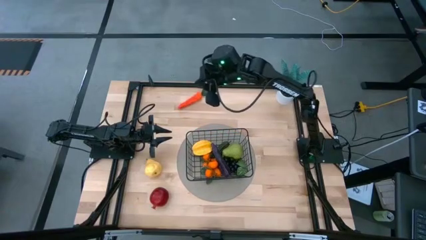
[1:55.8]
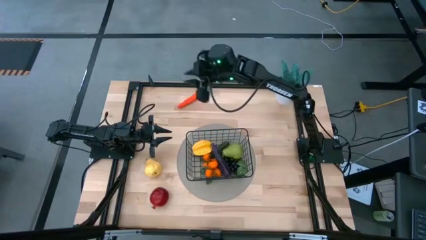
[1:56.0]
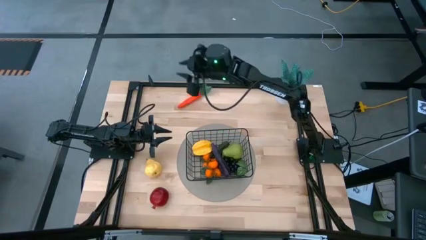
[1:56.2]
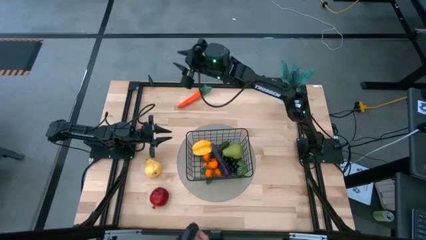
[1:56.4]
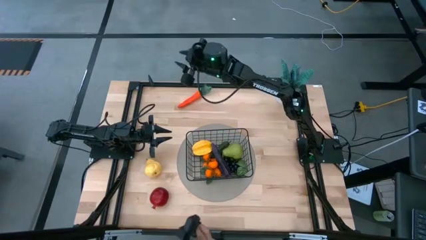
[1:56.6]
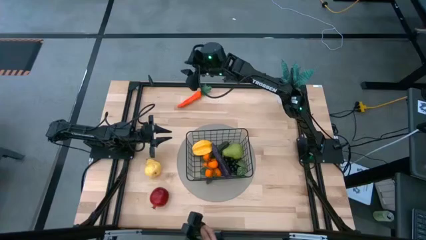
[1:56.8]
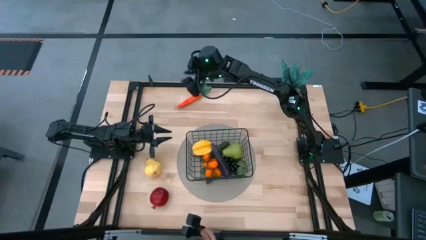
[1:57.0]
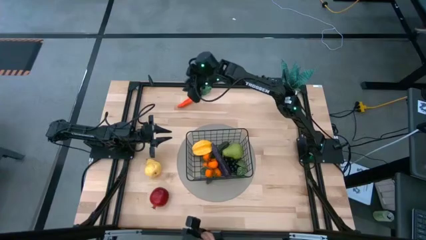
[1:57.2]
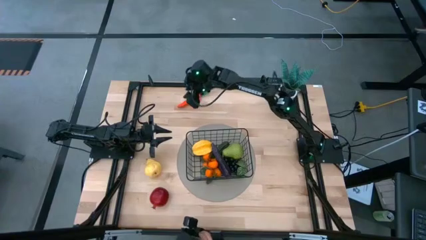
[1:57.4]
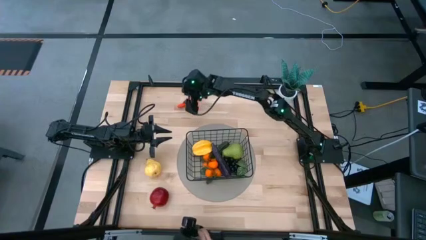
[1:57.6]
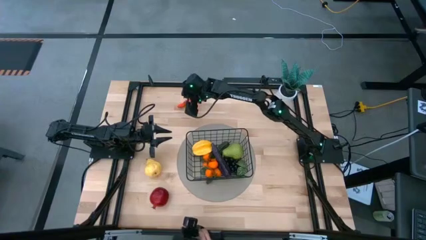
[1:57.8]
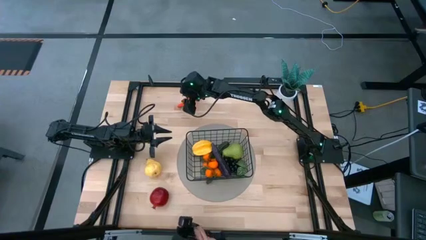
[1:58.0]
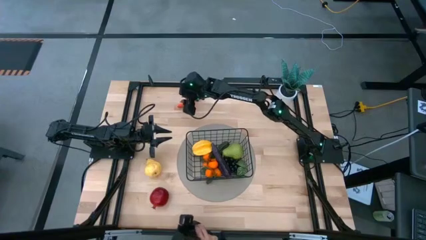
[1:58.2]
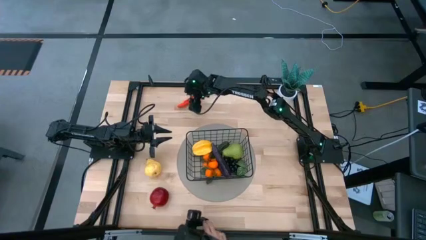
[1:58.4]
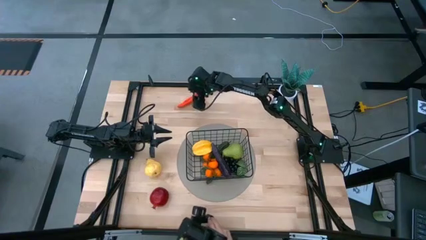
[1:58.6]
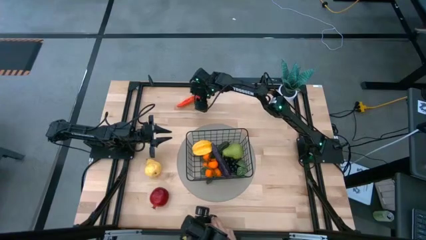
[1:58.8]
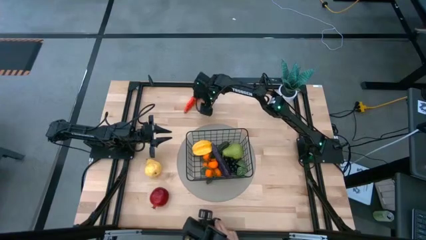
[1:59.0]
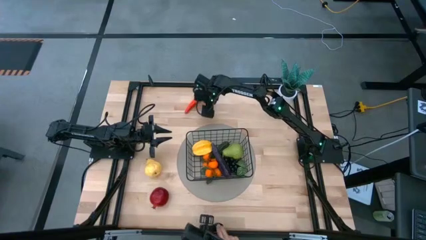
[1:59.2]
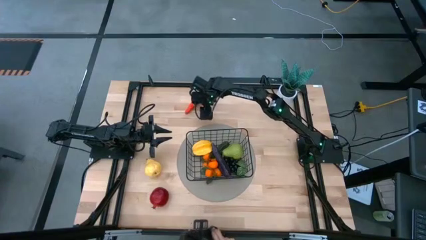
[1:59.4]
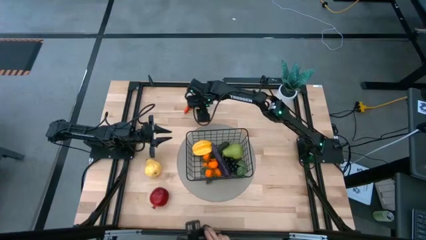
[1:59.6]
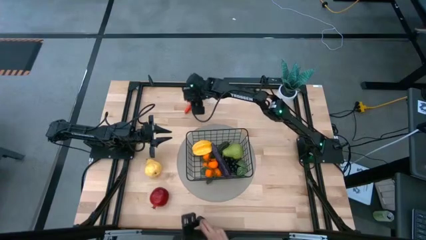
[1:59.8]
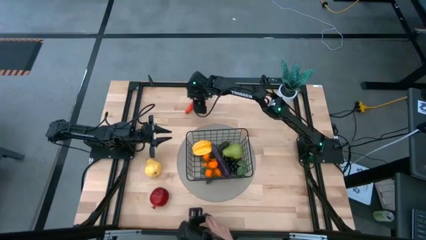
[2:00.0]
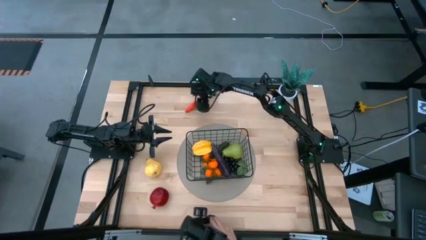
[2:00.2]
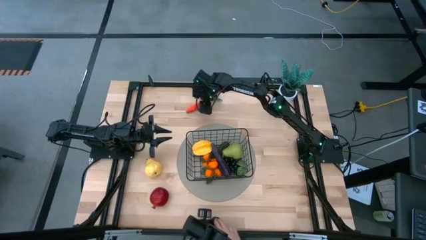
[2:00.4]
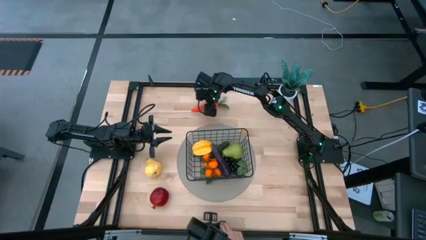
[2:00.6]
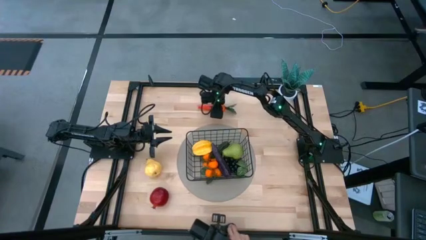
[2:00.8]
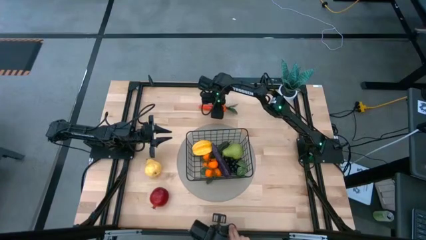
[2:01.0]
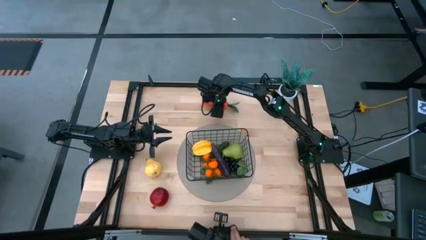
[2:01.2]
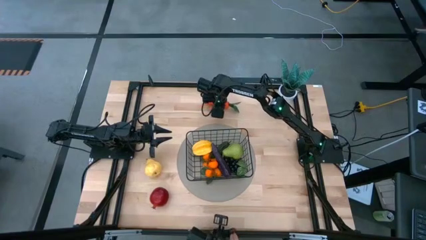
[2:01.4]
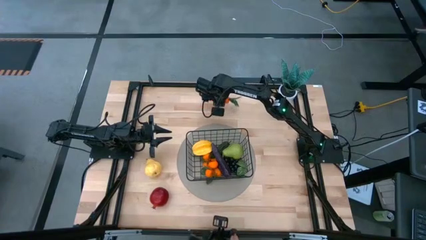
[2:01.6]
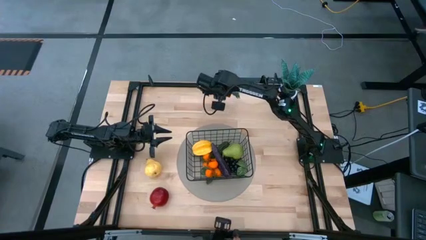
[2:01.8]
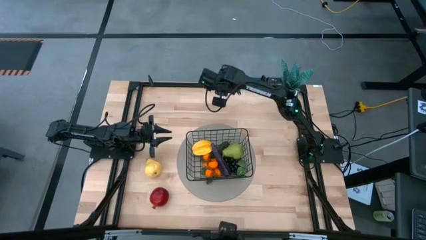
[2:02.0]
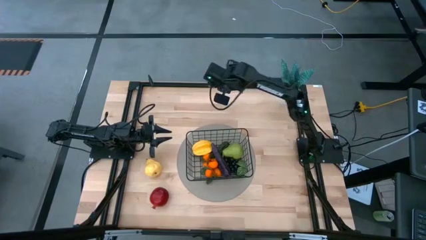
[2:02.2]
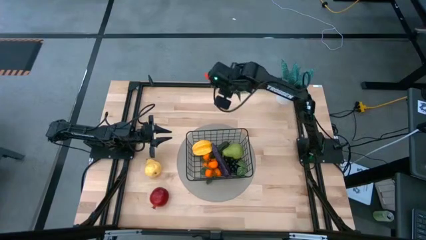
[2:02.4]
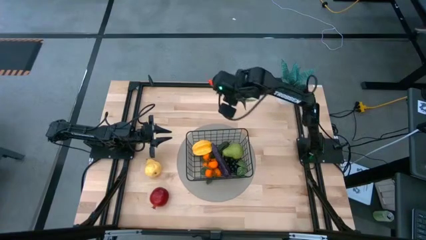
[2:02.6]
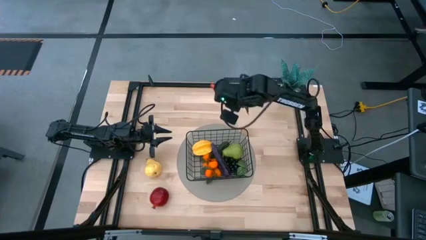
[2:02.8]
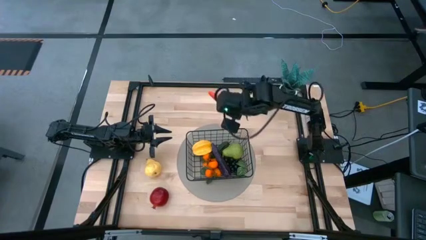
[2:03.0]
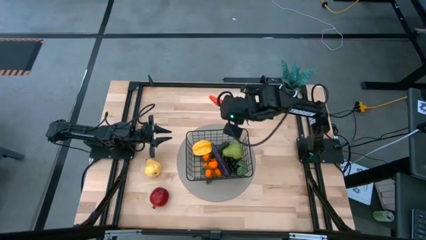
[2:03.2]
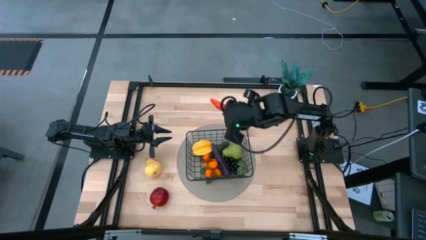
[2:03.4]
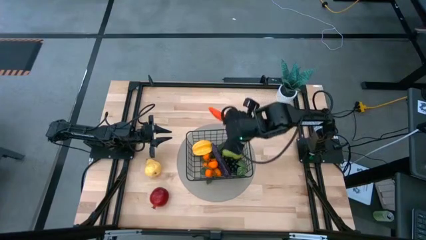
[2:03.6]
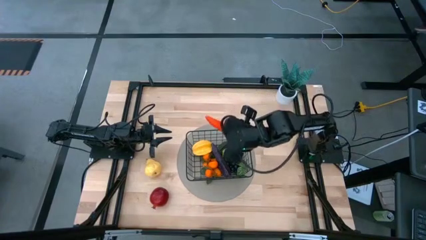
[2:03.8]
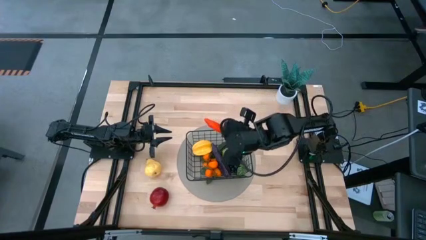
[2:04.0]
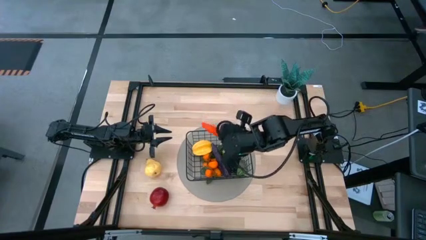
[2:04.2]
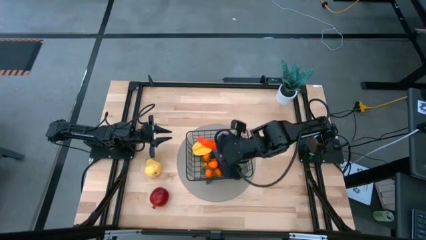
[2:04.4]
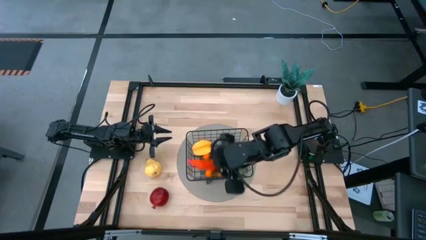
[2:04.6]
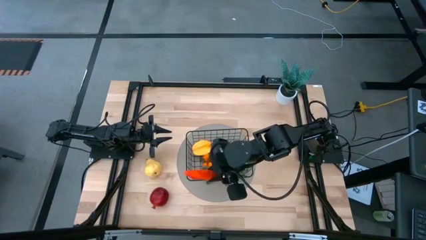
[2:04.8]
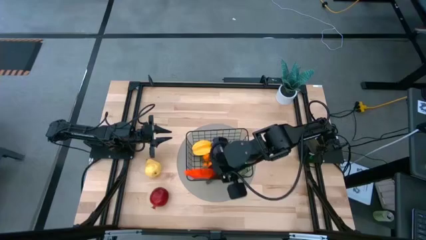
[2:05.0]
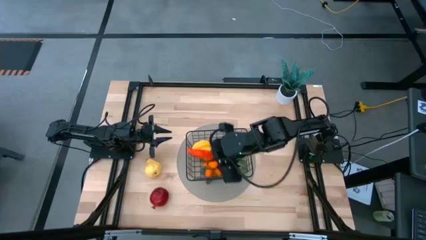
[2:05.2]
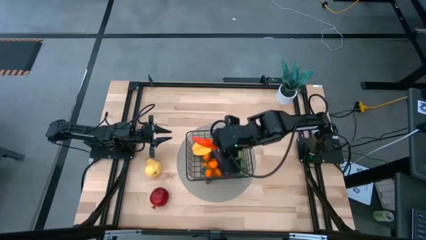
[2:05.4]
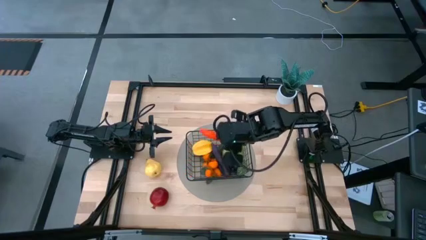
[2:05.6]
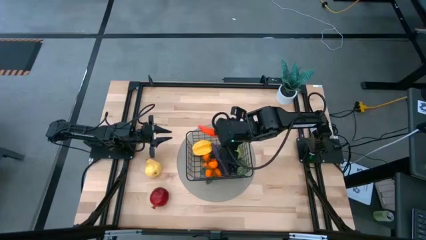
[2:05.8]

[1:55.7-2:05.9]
Task: Build produce basket
Put the carrot in the mesh basket

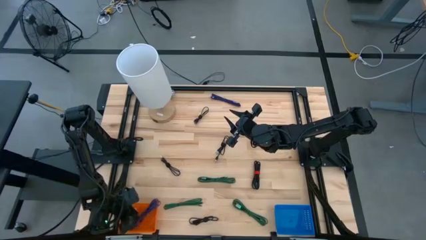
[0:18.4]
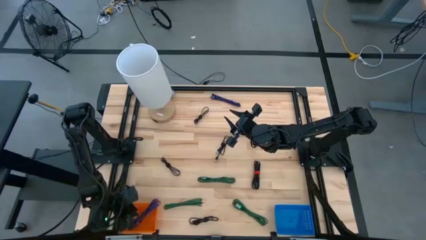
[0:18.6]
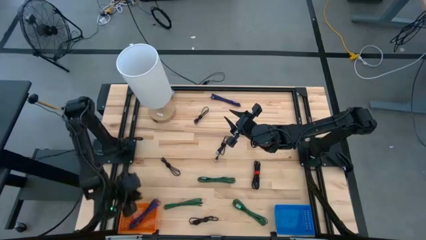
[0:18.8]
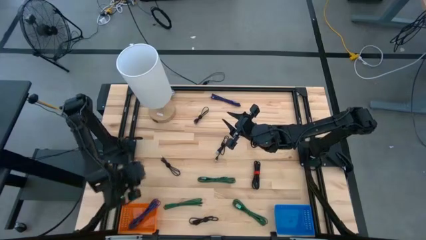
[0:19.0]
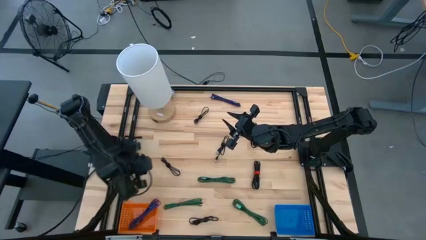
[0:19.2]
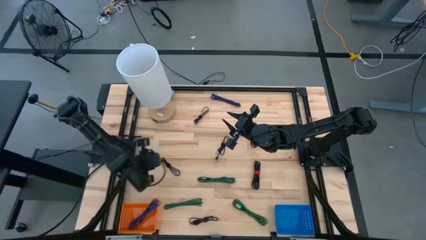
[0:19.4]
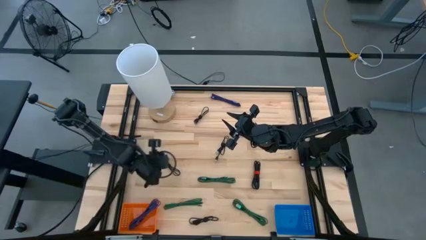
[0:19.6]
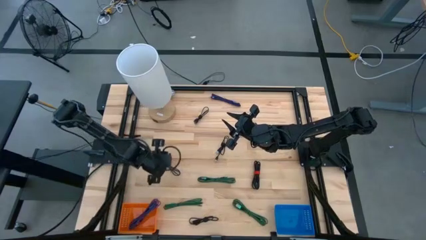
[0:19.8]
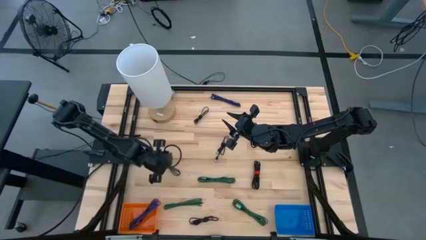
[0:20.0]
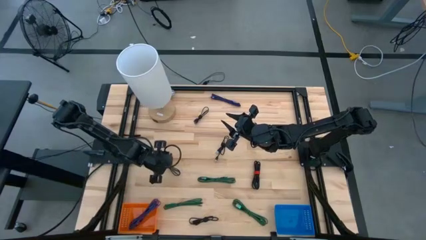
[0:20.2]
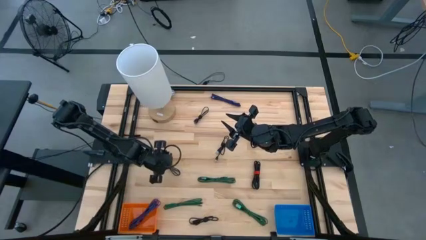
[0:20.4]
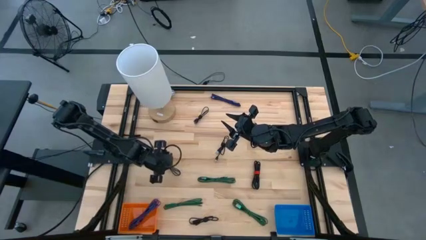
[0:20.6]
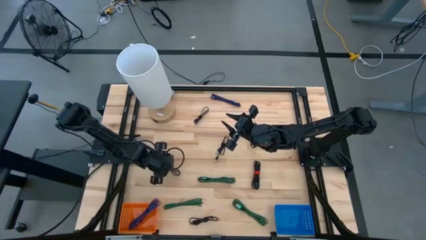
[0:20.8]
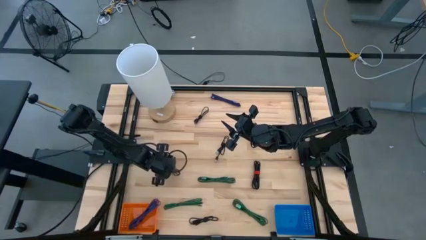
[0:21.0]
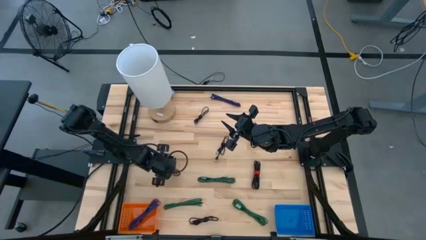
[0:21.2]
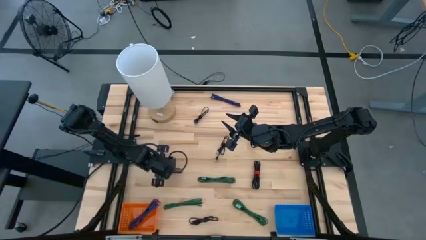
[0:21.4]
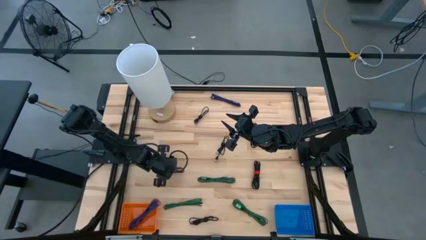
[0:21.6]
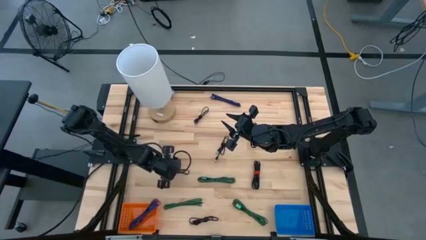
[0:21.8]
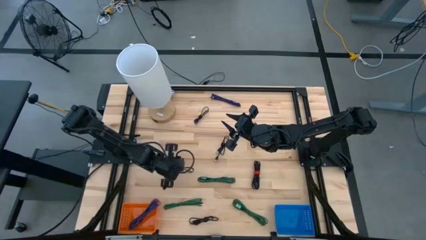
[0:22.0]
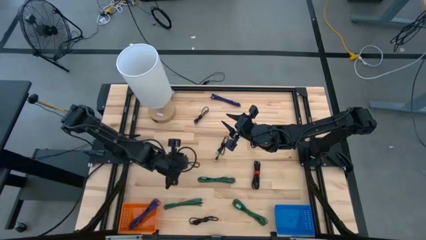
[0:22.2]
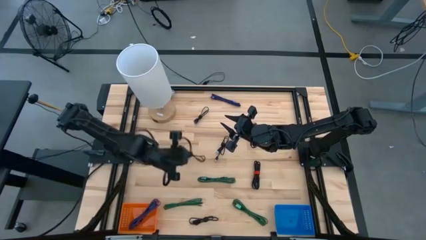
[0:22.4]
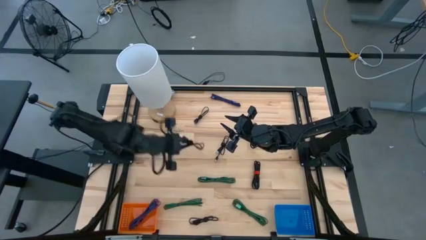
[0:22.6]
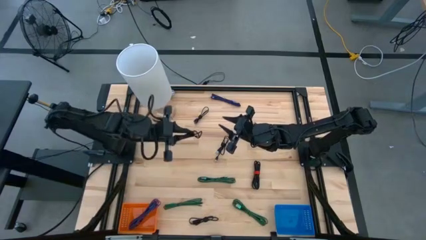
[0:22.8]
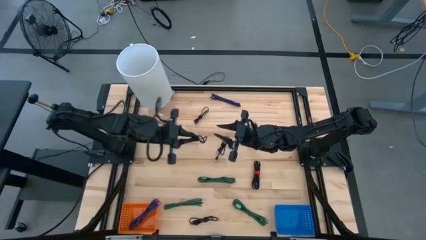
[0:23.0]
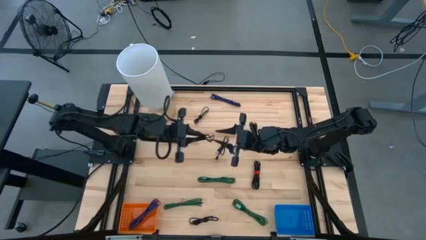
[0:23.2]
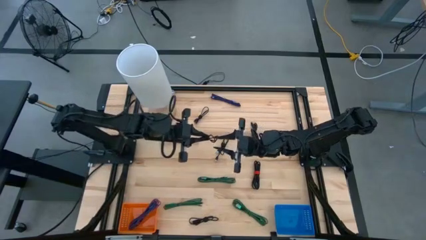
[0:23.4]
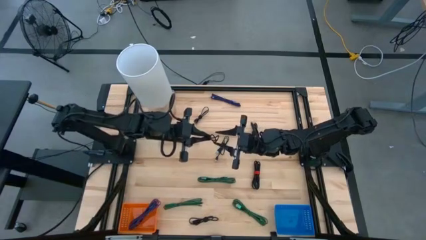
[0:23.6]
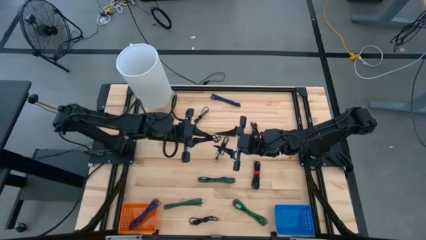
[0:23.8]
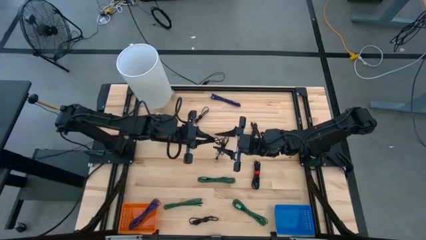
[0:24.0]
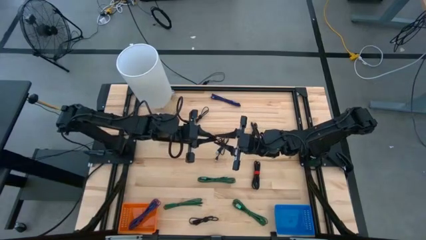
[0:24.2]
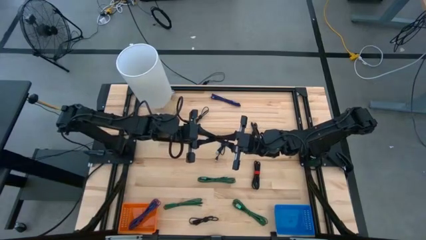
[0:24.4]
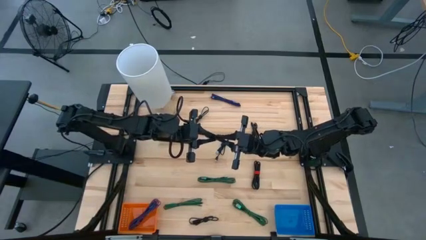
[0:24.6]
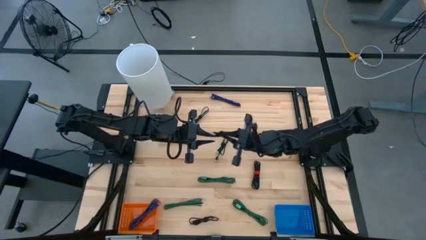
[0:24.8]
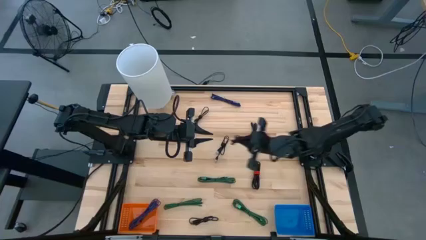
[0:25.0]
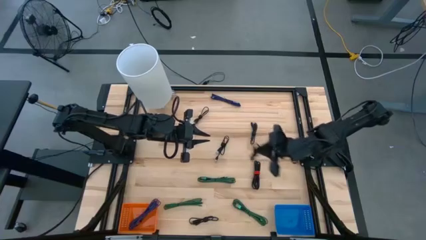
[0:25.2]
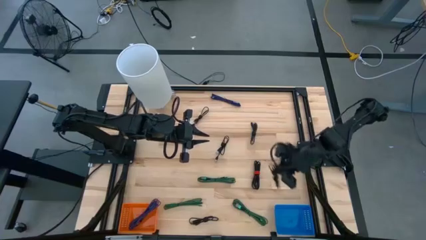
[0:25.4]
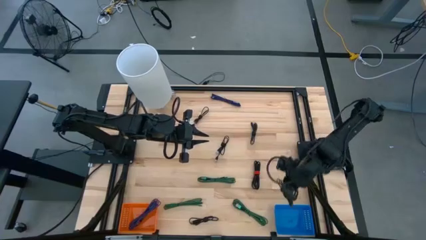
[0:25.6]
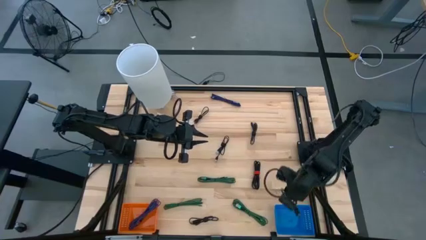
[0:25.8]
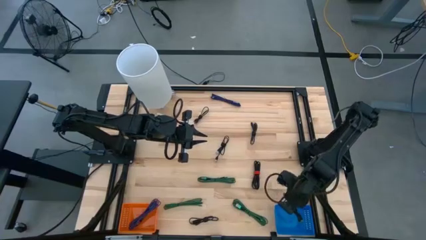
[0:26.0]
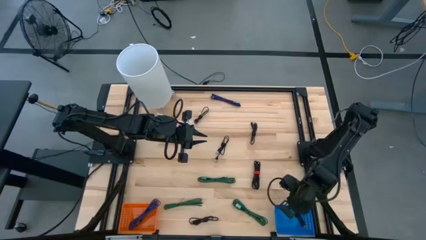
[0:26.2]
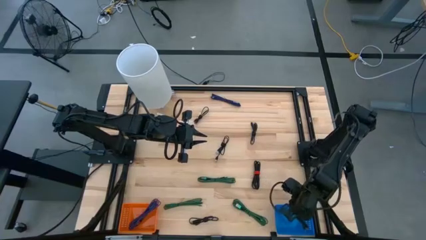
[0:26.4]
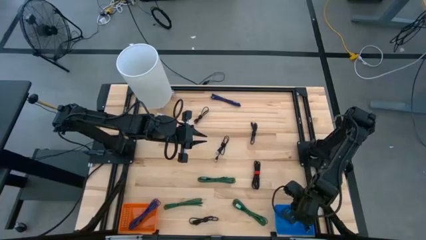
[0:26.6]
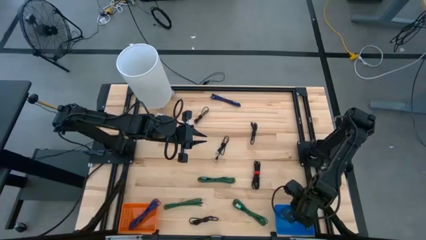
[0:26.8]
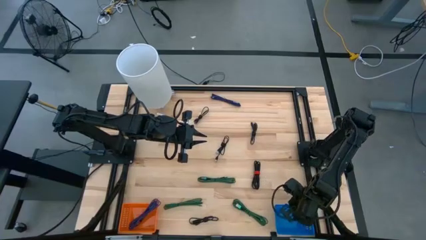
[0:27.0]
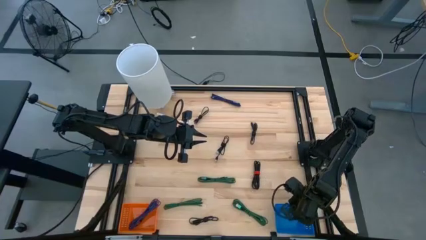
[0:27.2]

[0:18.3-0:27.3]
Task: Pick & Place USB Port
Put the black charger cable into the blue bin
